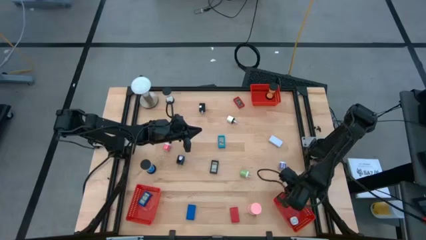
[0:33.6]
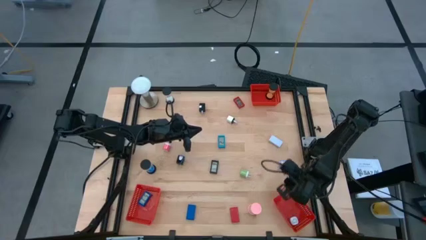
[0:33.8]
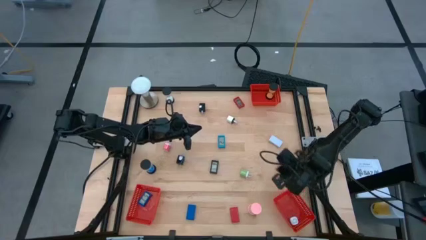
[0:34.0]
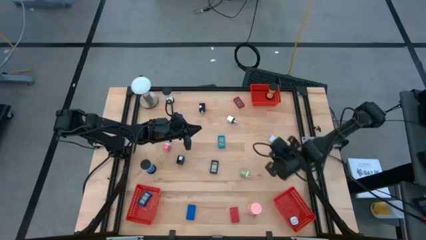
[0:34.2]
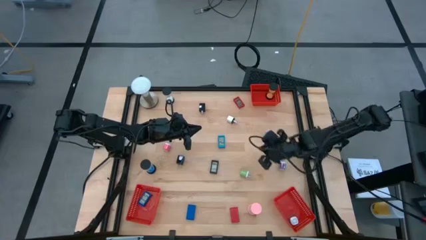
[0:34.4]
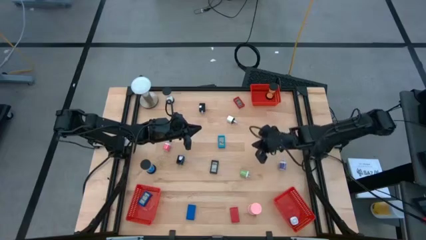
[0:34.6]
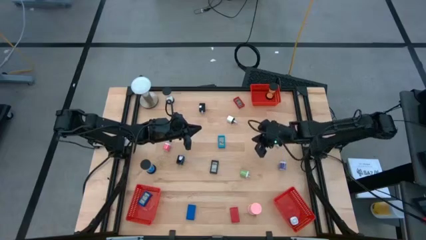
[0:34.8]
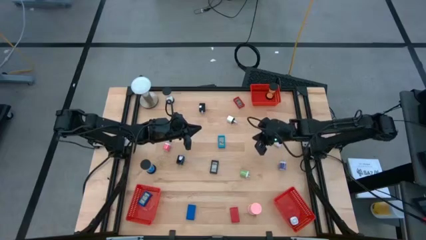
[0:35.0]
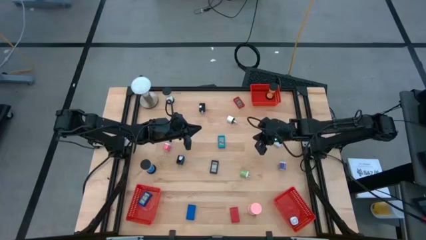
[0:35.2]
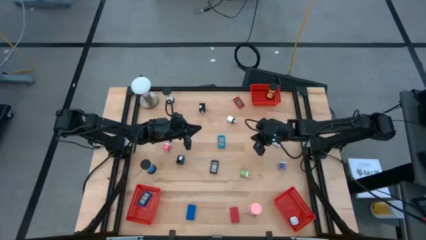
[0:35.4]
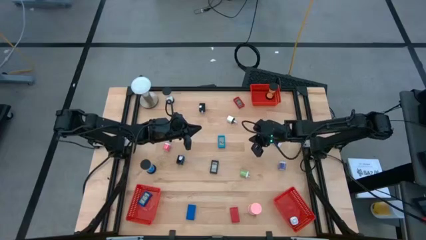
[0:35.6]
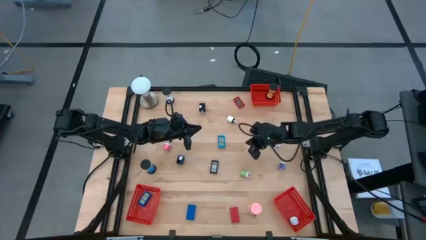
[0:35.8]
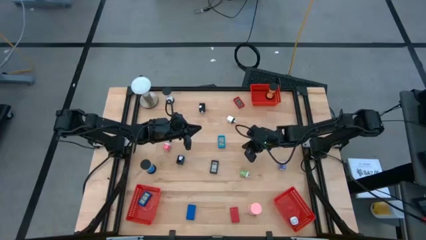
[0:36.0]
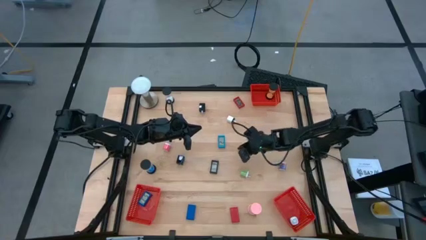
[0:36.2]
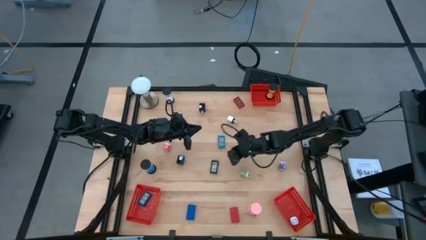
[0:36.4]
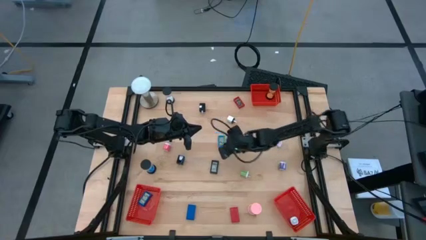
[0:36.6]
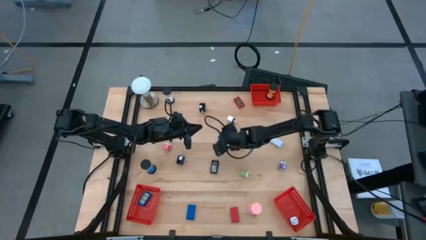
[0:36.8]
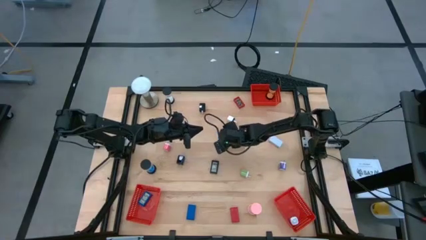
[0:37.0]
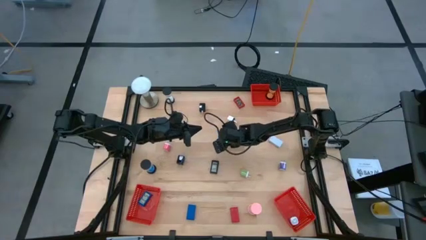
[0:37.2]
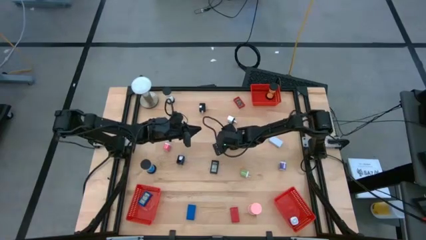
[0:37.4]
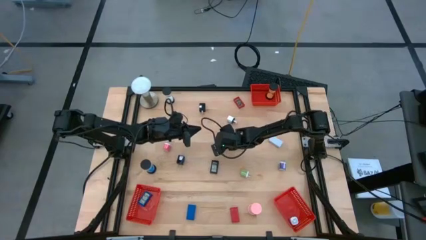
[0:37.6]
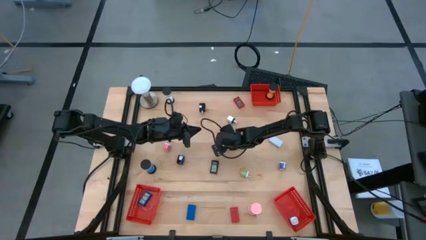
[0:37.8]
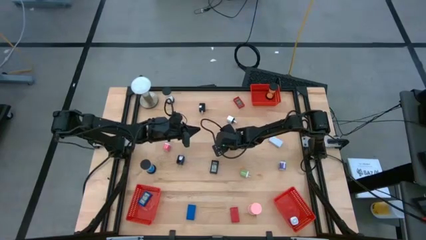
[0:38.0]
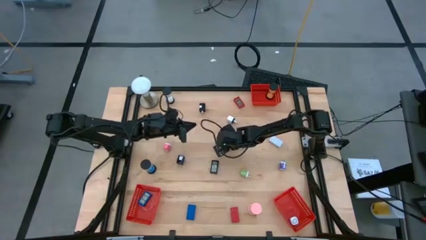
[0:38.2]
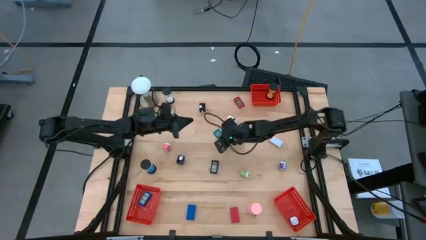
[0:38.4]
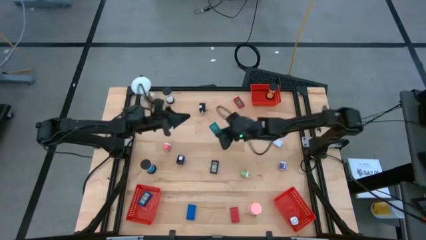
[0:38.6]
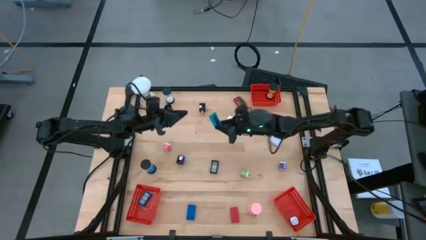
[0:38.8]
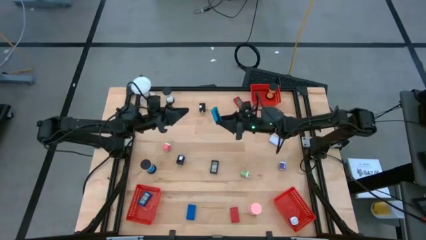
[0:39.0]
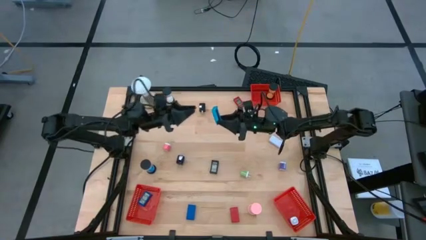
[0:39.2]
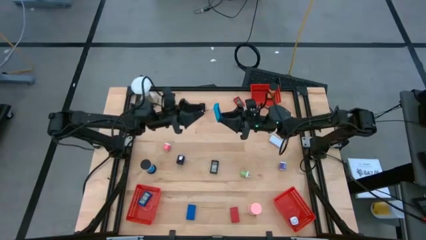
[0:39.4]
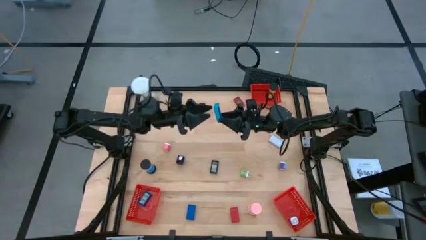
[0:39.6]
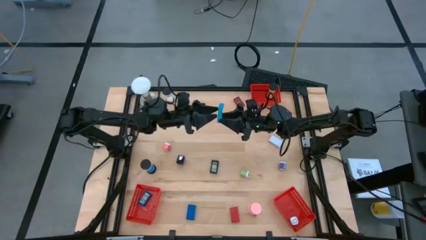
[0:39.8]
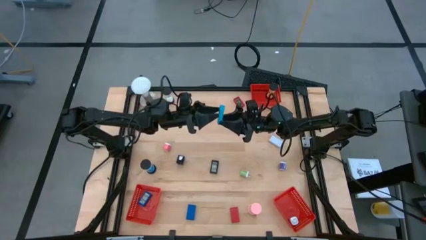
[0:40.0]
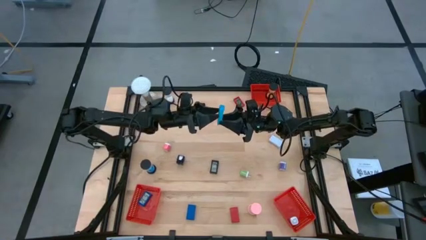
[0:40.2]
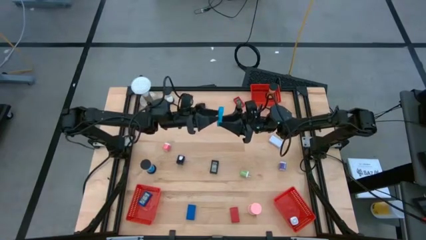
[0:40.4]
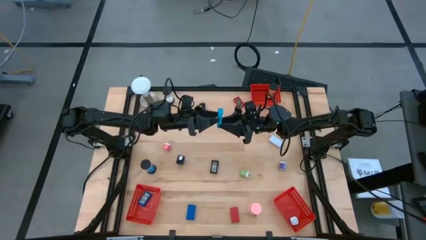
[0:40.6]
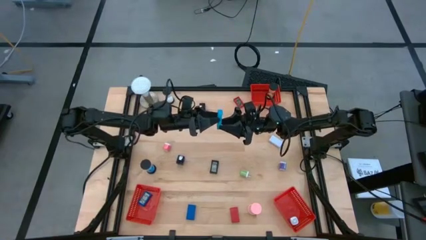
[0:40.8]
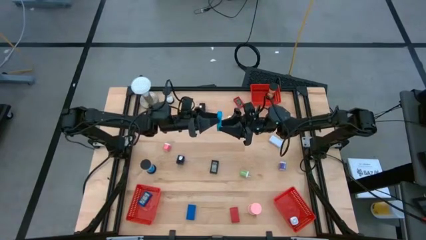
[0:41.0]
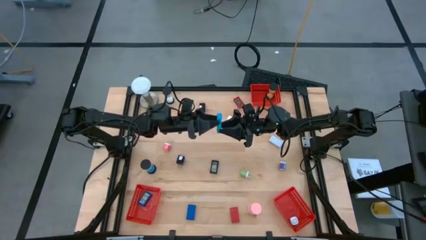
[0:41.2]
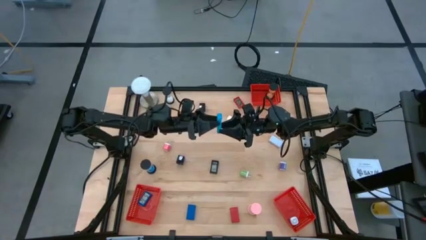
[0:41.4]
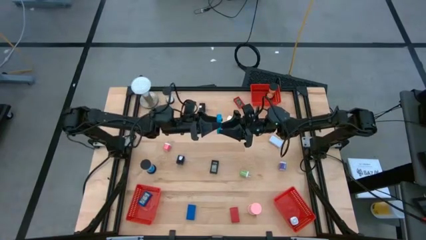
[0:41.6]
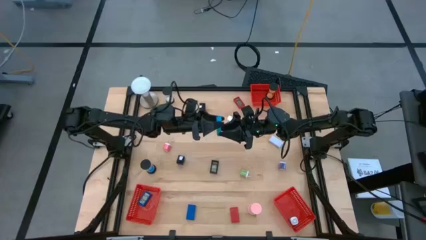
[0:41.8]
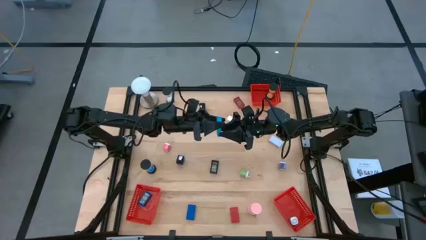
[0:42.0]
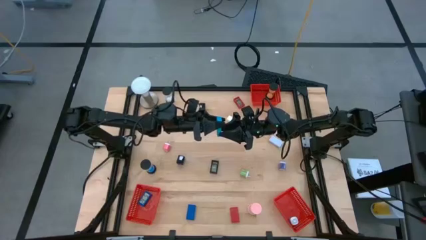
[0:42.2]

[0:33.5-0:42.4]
Task: Pick & Place Office items
Put the light blue digital clock into the bottom left red basket

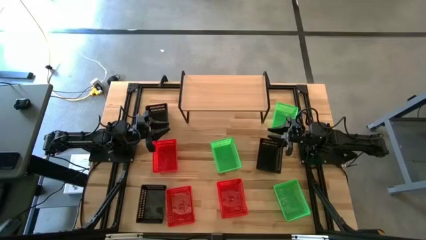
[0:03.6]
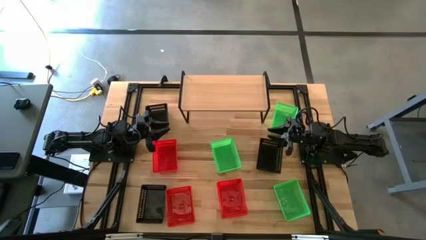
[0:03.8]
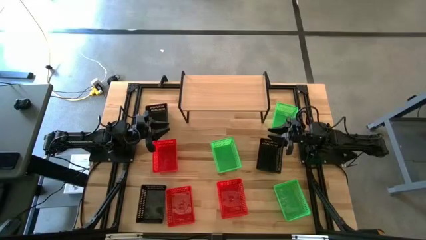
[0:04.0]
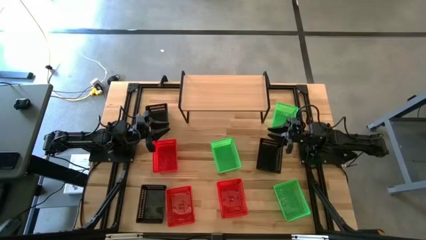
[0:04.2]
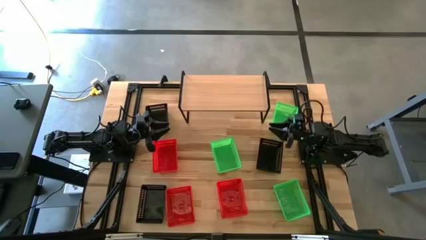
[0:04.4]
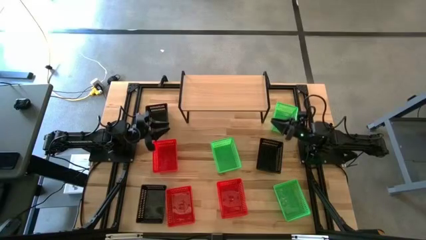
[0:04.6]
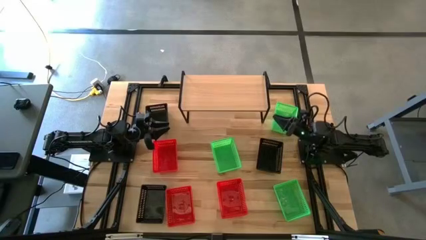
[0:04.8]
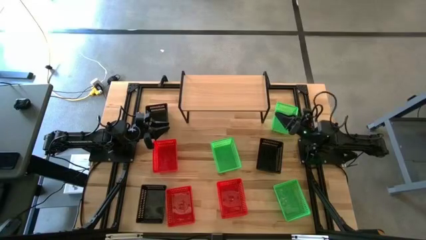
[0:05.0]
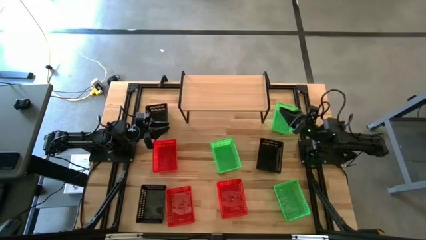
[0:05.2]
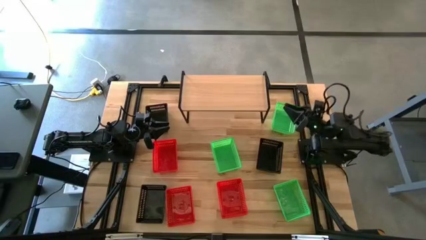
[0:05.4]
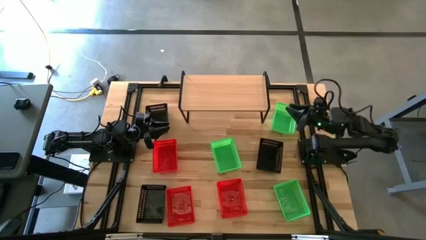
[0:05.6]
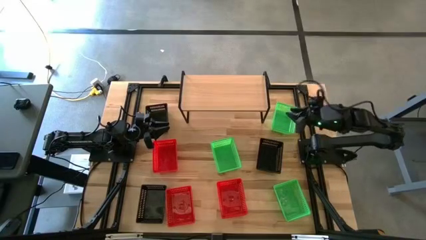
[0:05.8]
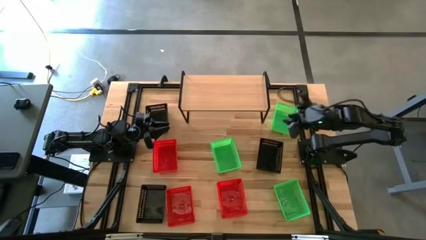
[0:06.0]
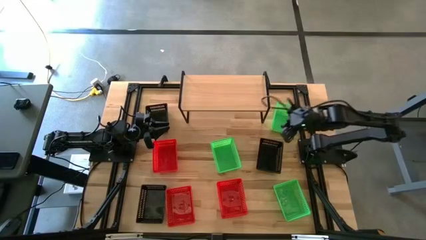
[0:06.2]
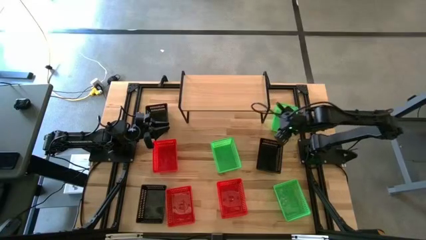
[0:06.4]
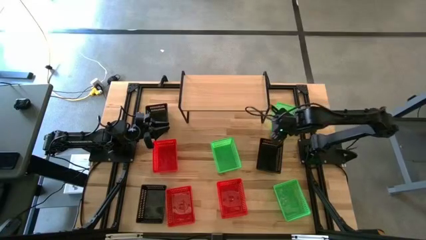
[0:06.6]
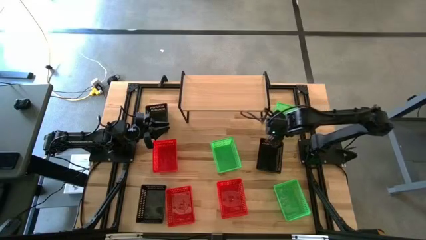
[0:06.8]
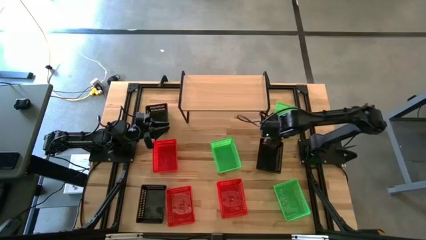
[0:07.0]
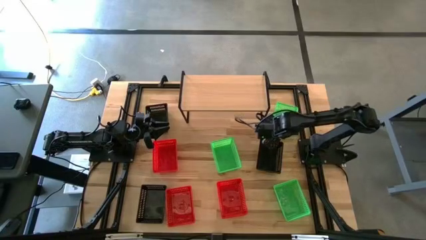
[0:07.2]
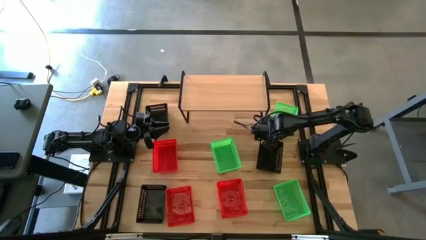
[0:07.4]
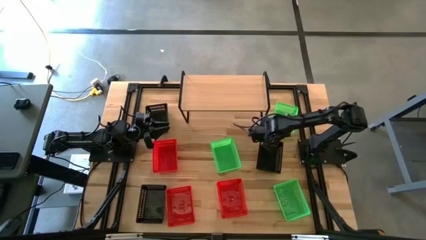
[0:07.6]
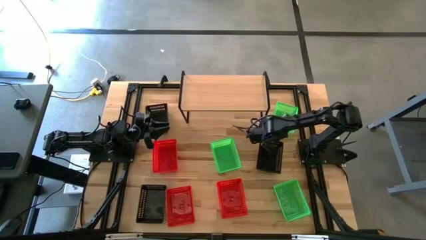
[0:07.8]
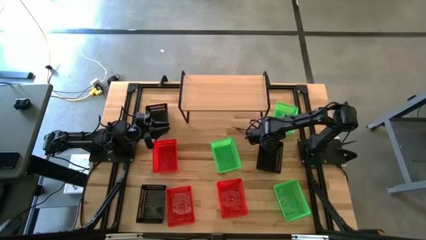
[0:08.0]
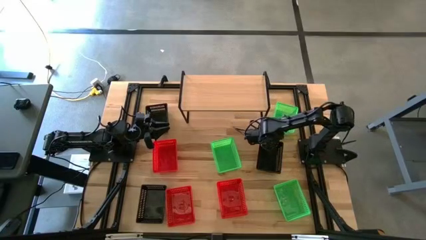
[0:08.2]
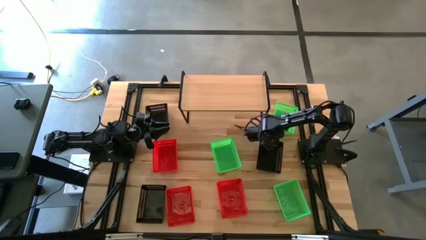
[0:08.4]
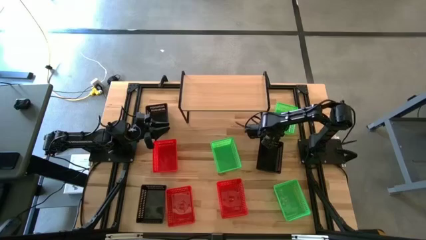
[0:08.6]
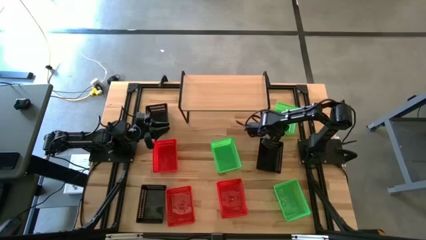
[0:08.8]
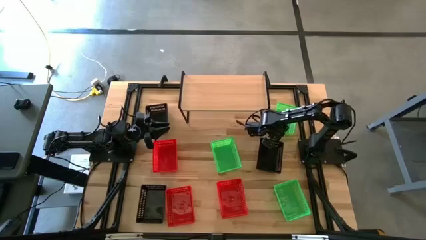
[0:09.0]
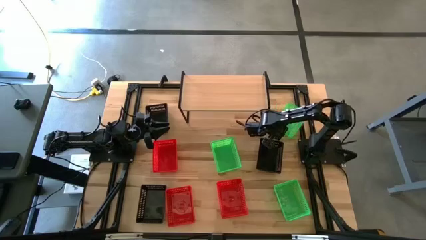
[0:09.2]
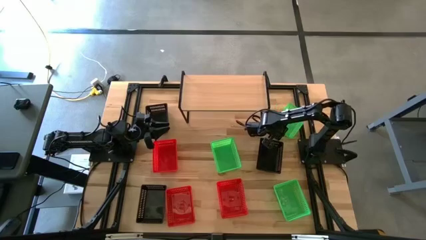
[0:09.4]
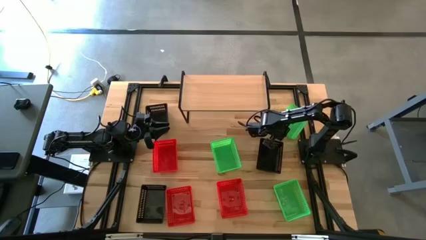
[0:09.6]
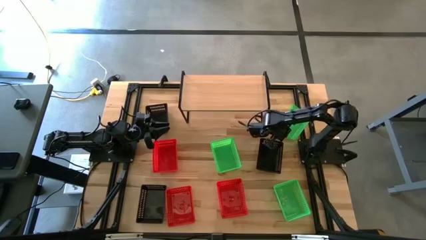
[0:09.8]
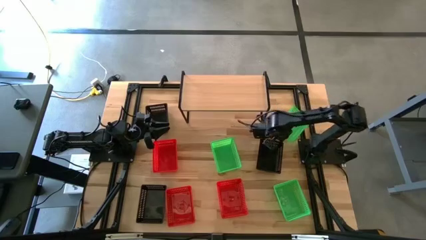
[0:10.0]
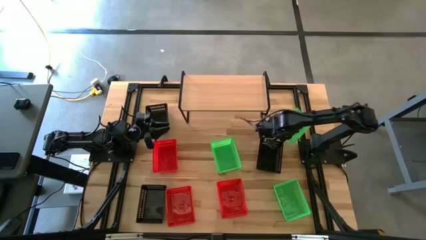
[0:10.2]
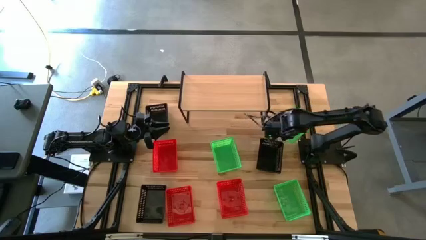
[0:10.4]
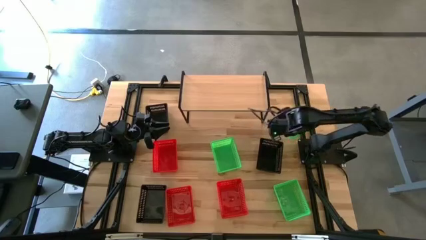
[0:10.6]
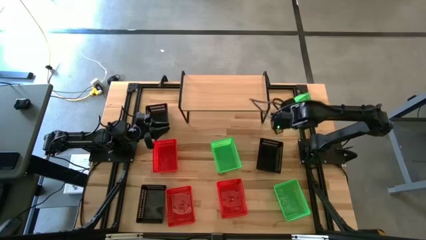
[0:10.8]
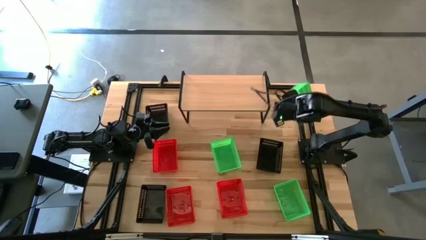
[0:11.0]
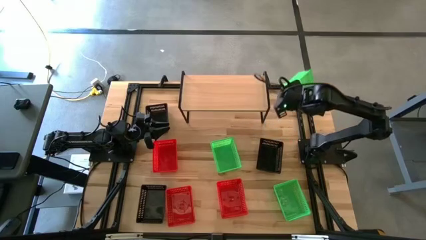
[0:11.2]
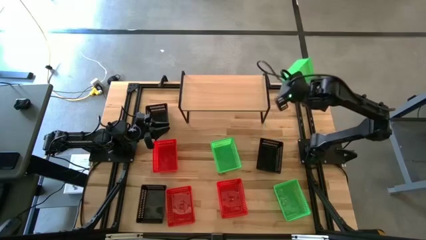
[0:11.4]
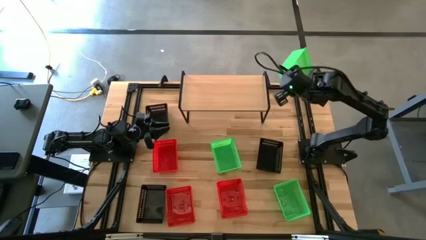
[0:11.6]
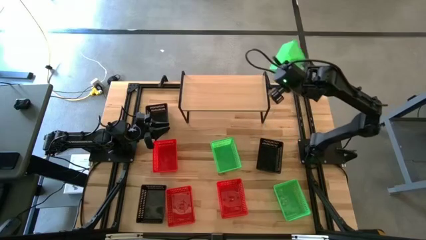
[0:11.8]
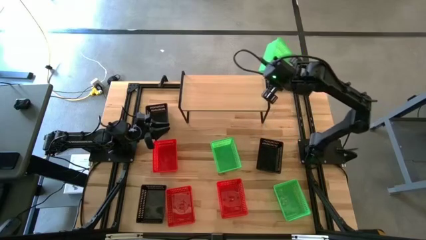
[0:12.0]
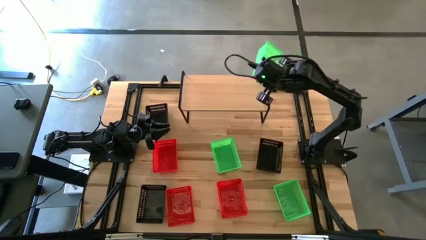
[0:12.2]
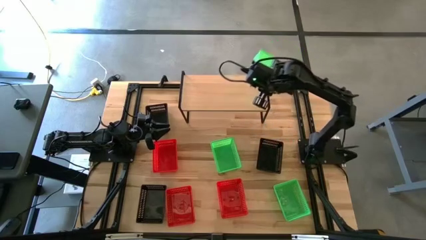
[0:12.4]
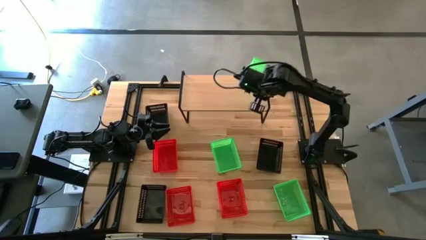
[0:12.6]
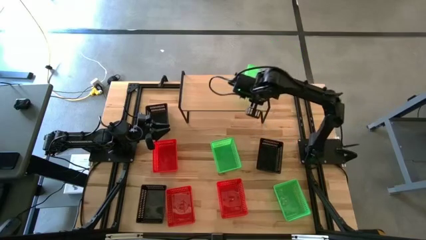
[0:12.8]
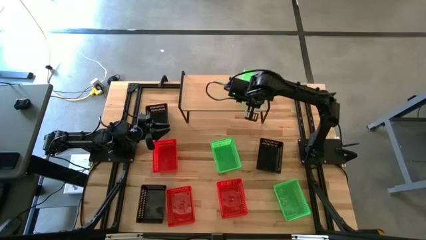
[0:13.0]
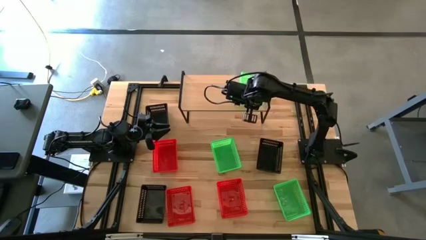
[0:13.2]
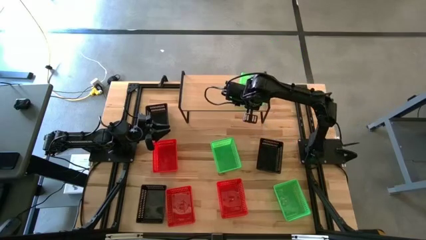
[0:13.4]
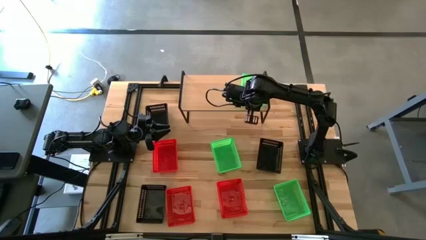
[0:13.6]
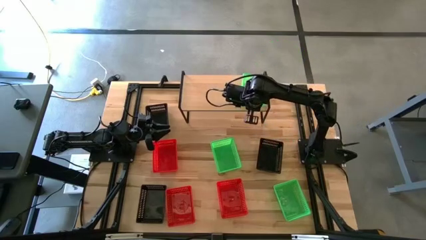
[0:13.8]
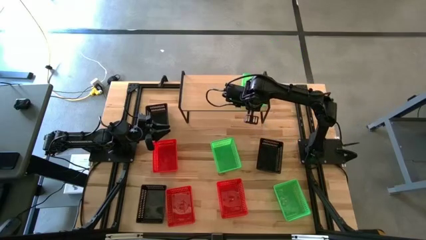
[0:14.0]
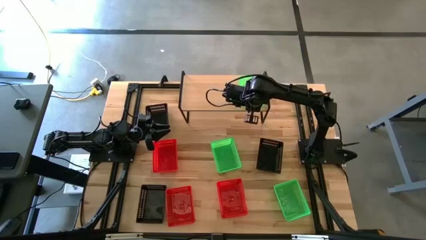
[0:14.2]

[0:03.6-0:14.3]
Task: Stack baskets on shelf by color
Put the top green bin on the shelf
